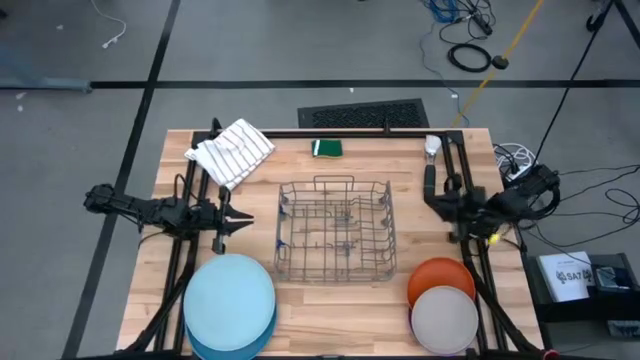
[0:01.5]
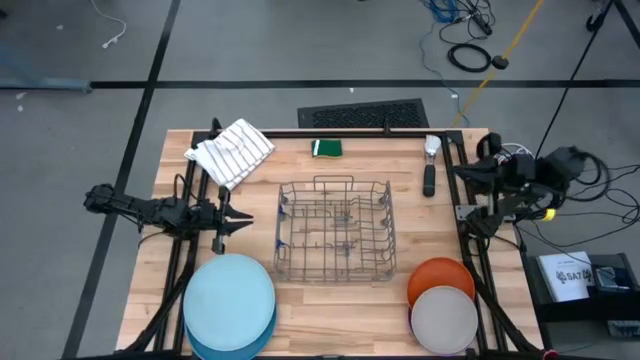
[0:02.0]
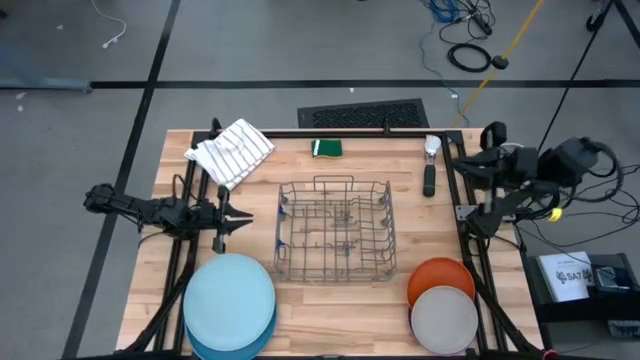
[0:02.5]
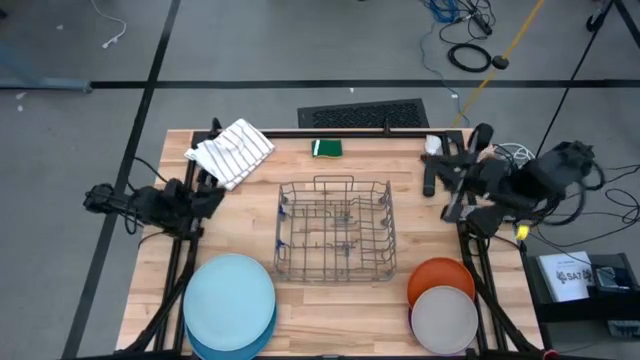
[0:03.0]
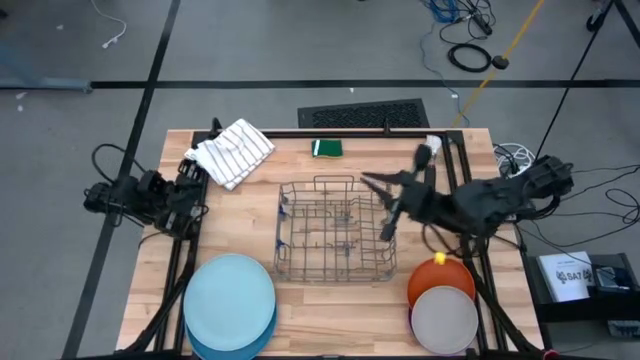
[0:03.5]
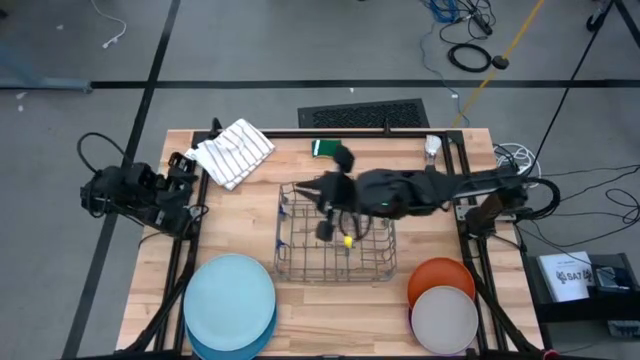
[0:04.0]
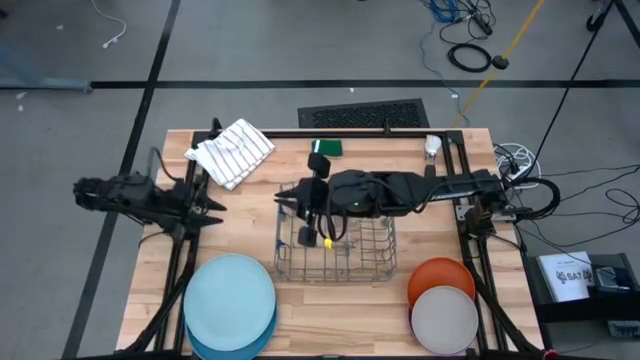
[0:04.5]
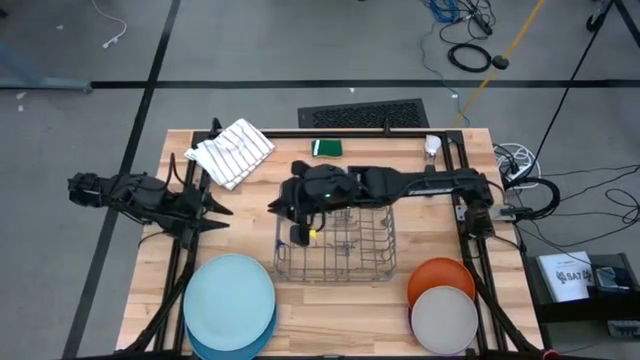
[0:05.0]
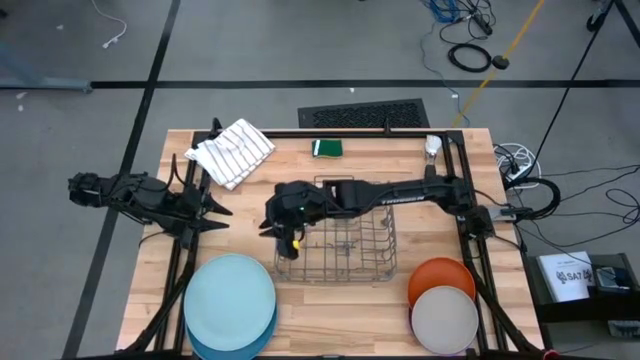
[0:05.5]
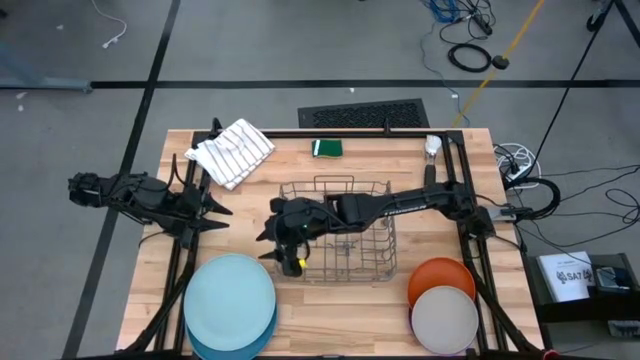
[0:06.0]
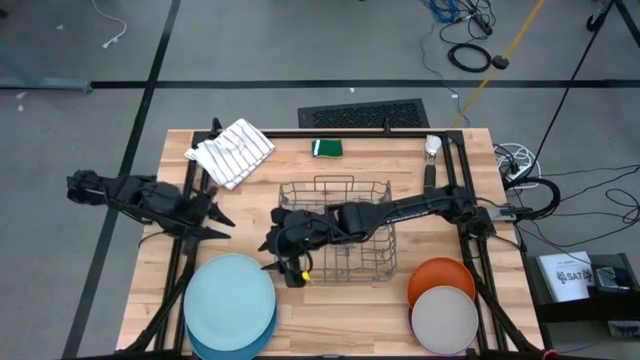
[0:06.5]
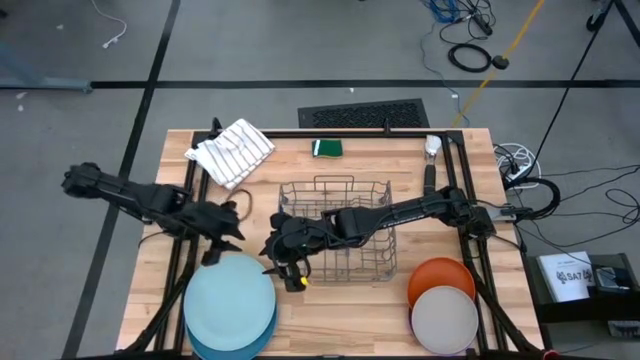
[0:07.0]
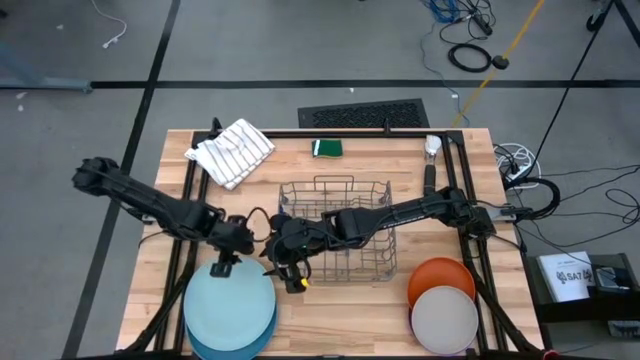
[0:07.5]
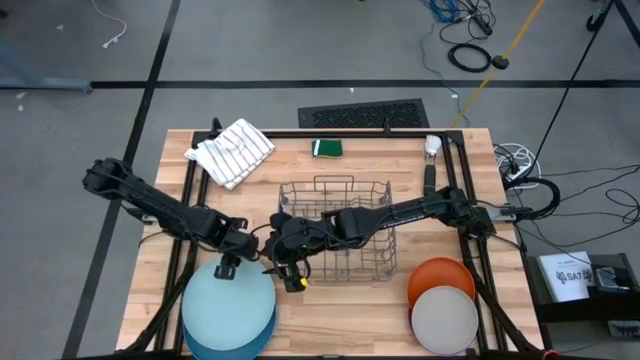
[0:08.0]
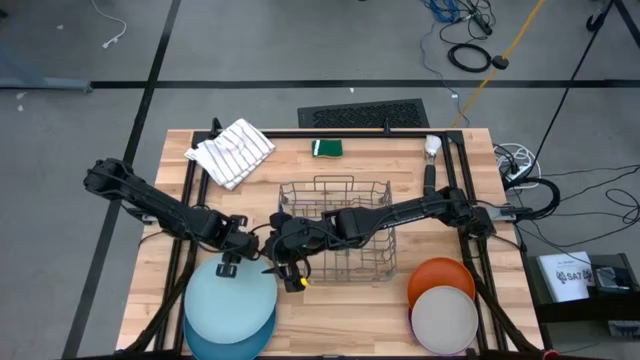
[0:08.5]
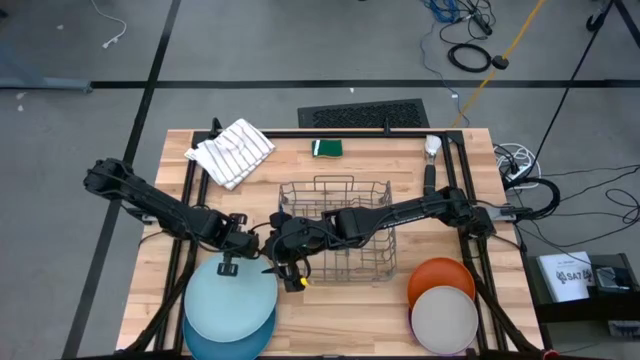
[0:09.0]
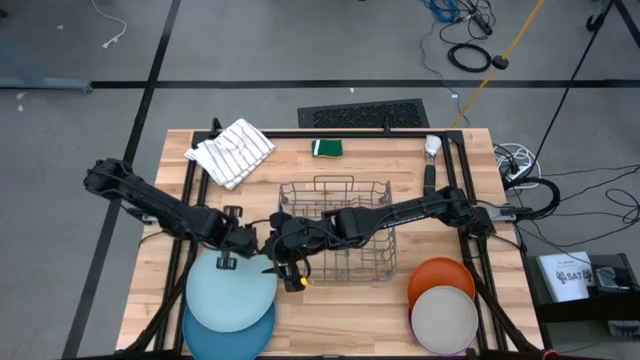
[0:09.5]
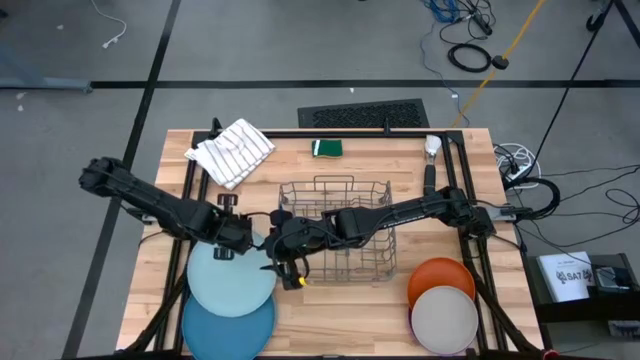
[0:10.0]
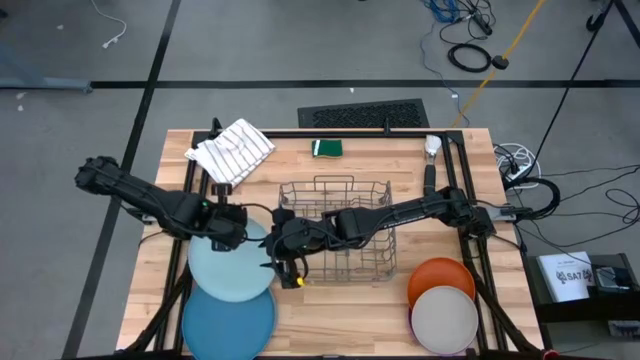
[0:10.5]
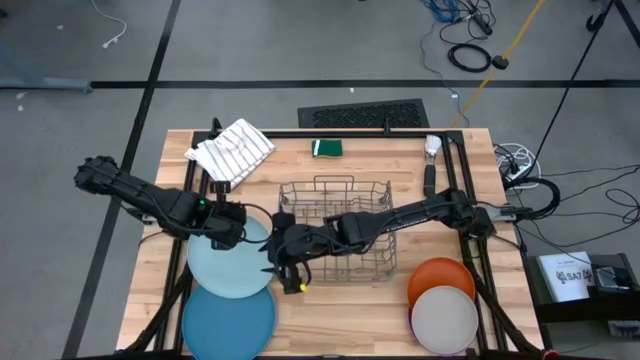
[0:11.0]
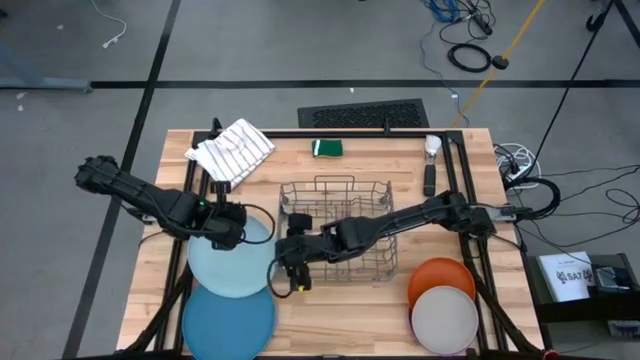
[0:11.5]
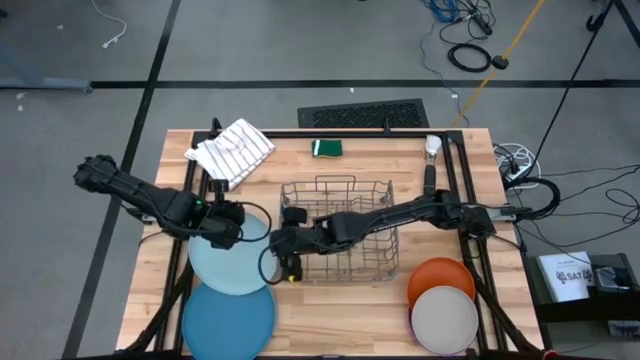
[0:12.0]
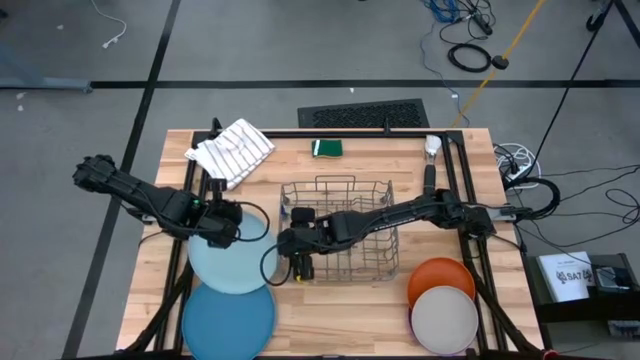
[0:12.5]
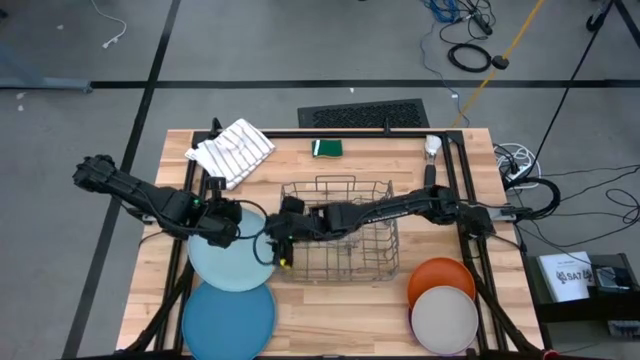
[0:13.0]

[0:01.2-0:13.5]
Task: Sort dishes
Put the light blue plate into the dish rack

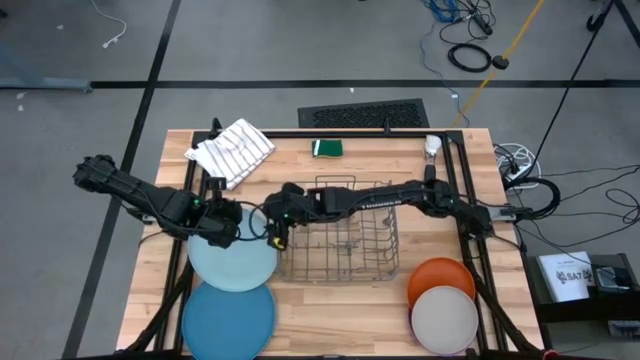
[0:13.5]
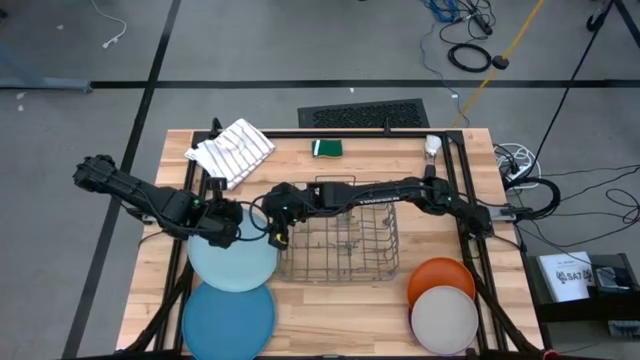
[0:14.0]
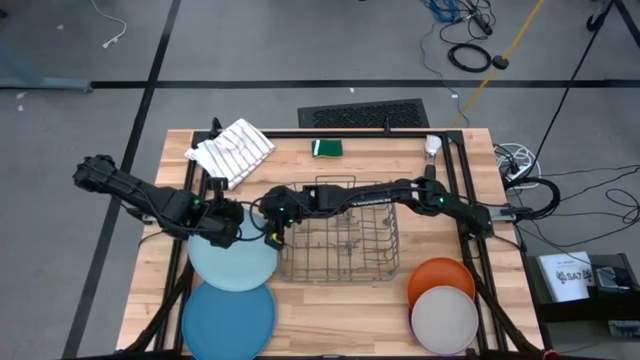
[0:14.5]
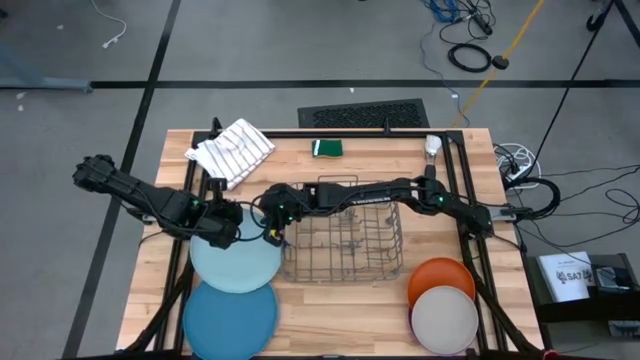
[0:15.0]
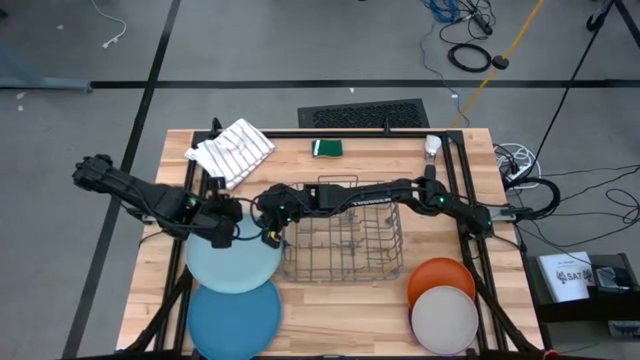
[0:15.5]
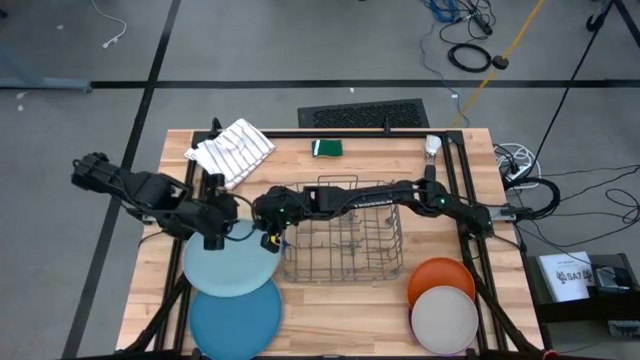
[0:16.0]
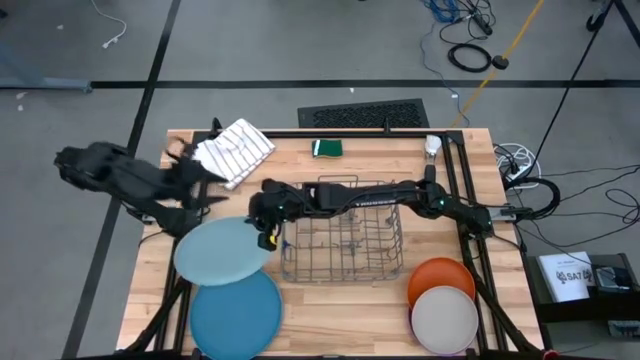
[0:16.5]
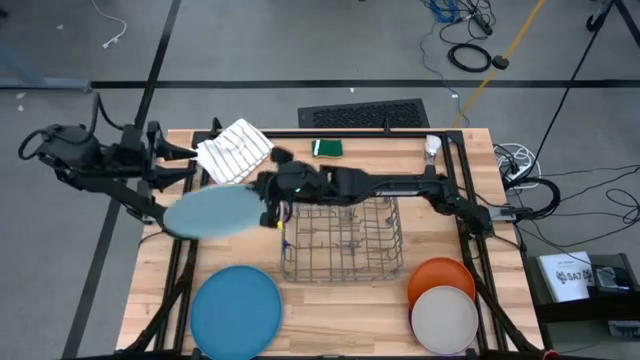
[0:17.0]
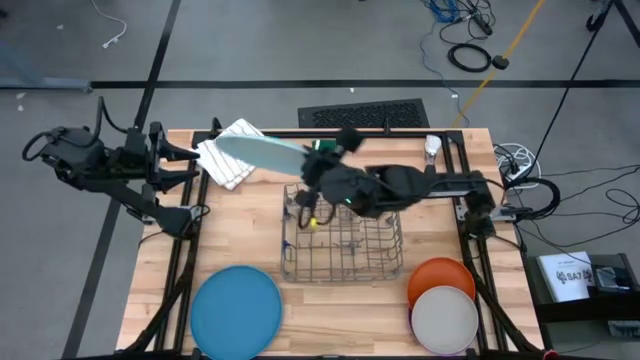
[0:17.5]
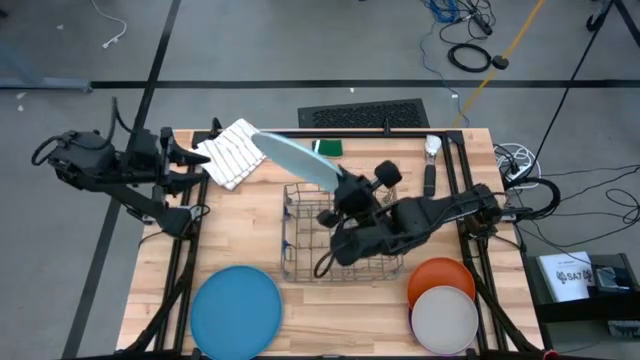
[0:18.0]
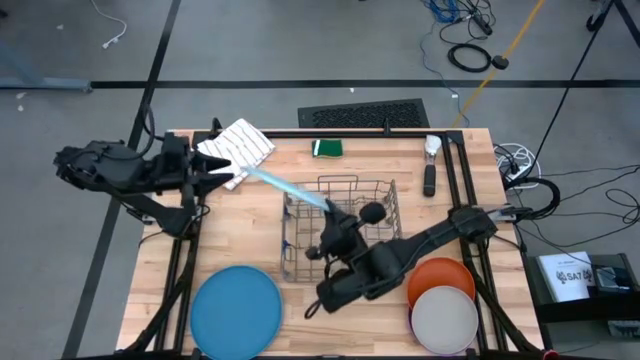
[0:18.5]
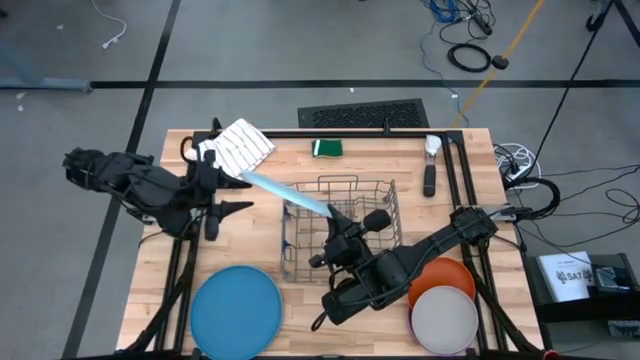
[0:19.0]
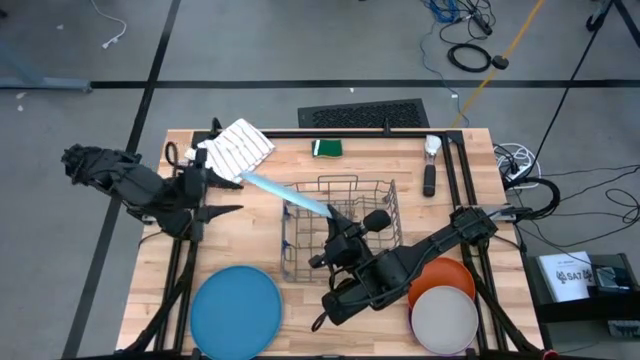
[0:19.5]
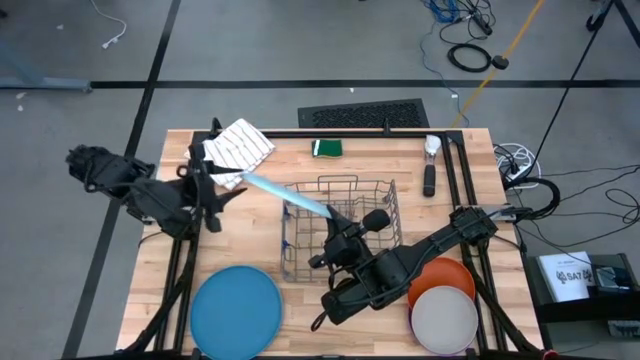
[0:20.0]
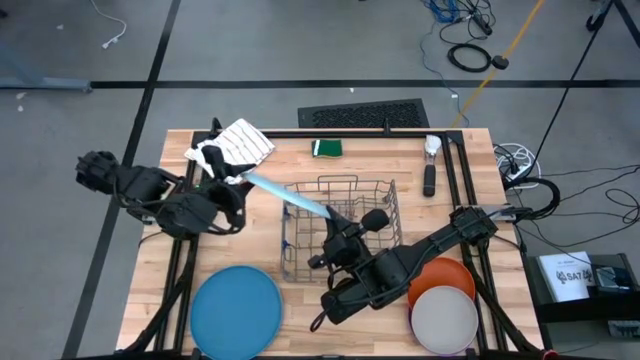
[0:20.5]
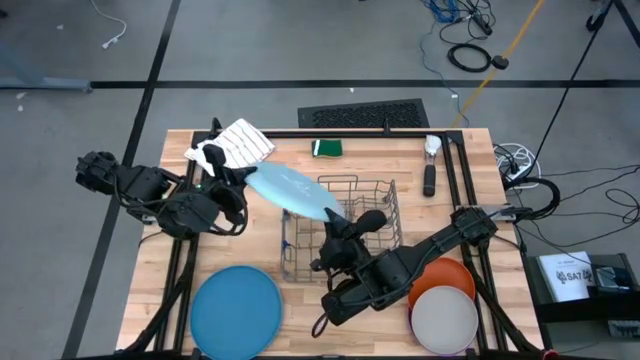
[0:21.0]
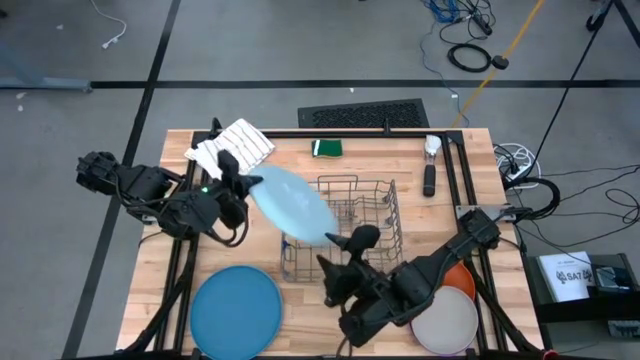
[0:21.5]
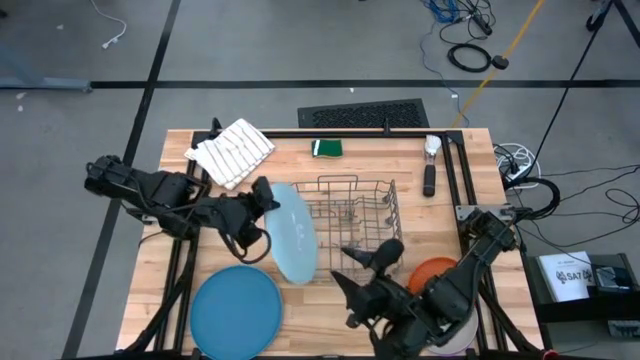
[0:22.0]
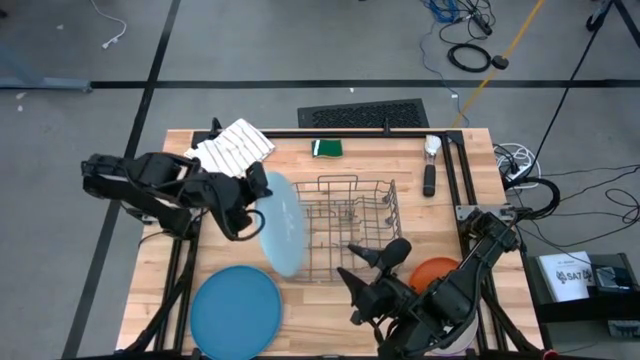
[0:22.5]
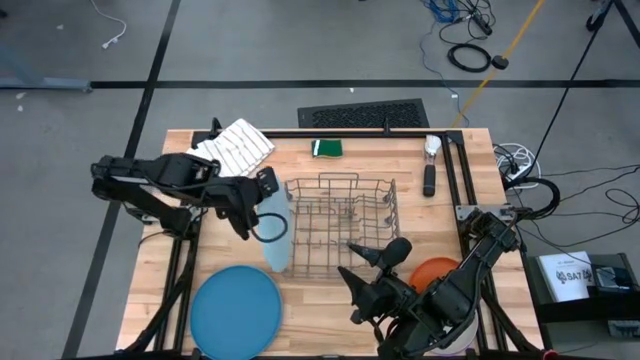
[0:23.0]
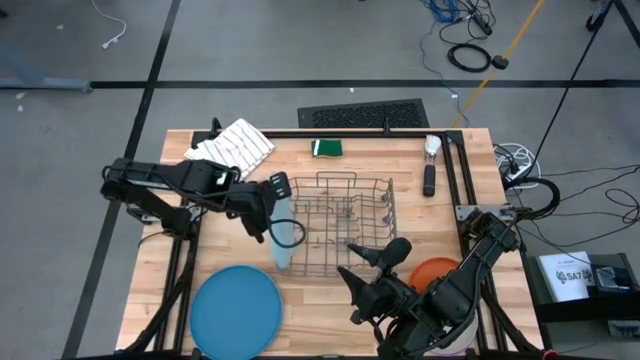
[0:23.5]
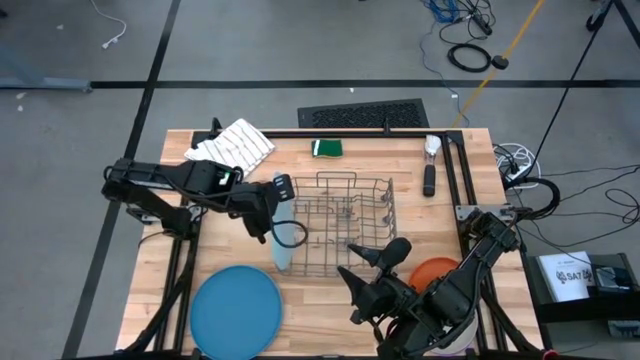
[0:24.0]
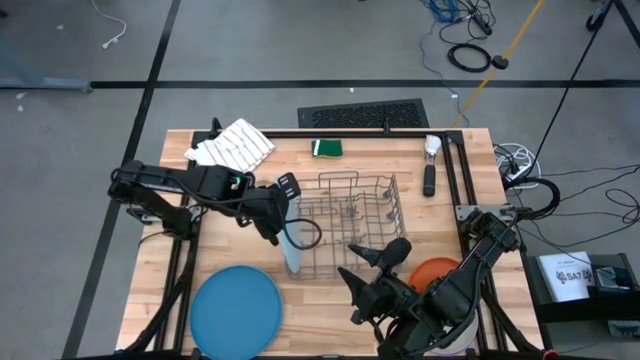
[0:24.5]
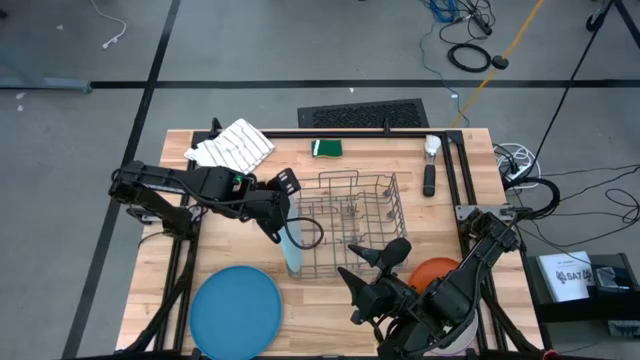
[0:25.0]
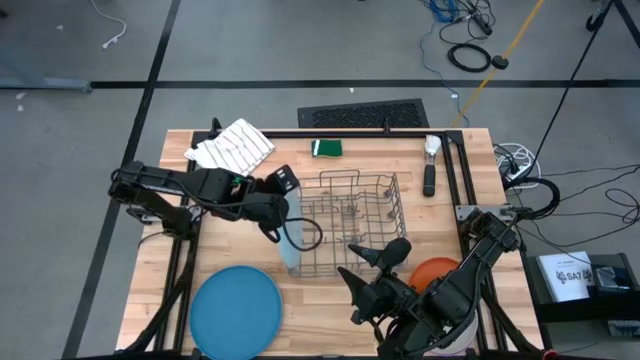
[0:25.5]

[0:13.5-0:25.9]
Put the light blue plate into the dish rack
